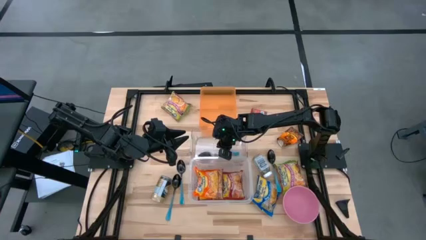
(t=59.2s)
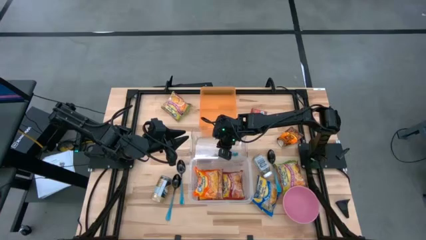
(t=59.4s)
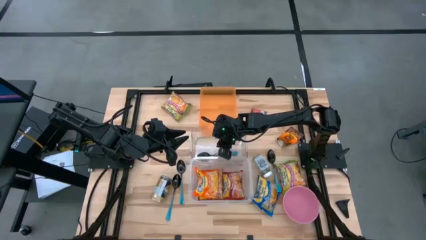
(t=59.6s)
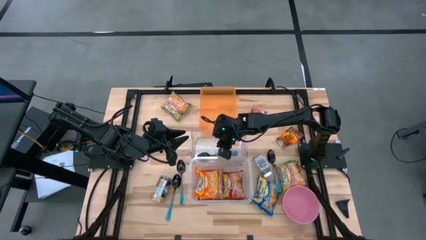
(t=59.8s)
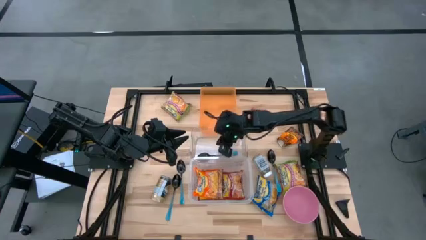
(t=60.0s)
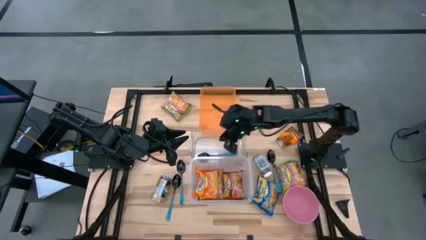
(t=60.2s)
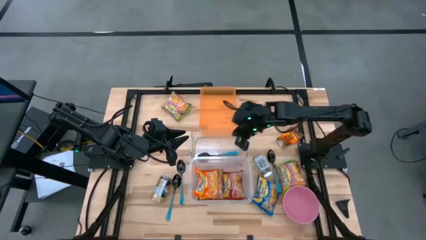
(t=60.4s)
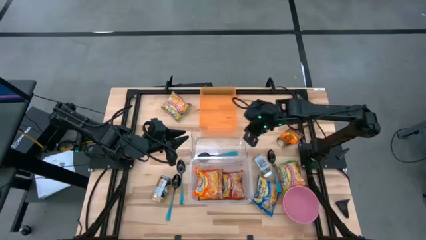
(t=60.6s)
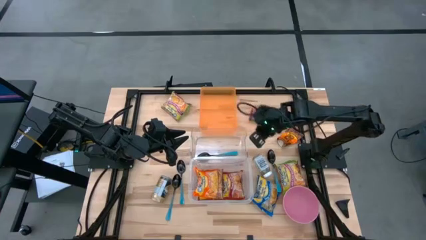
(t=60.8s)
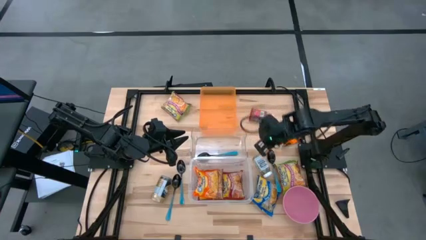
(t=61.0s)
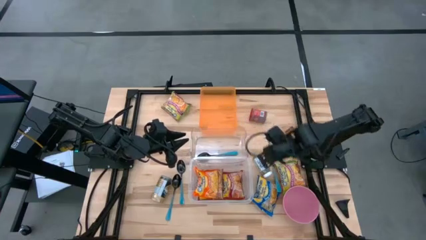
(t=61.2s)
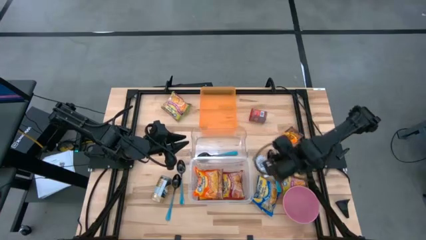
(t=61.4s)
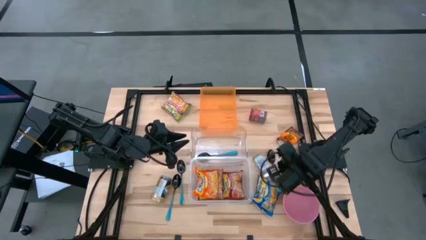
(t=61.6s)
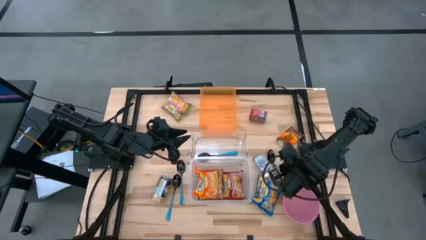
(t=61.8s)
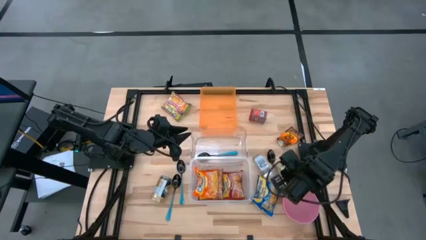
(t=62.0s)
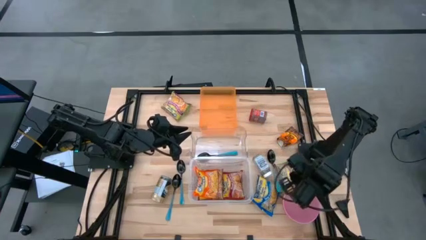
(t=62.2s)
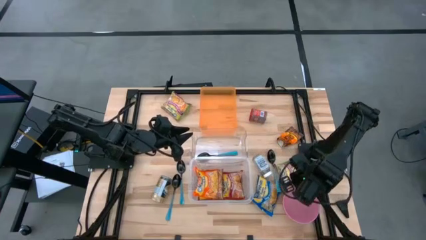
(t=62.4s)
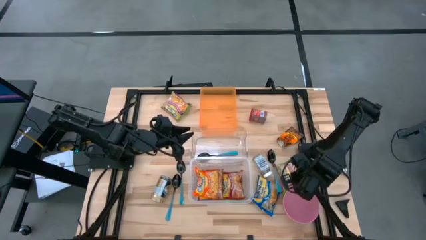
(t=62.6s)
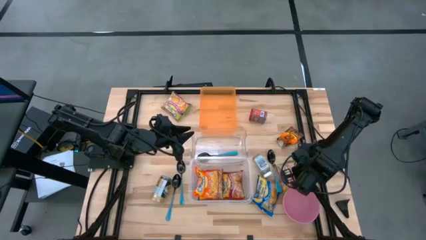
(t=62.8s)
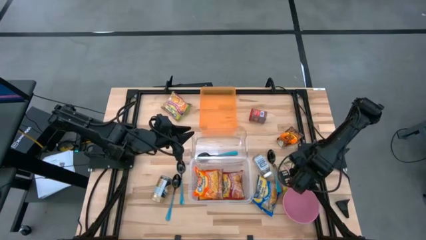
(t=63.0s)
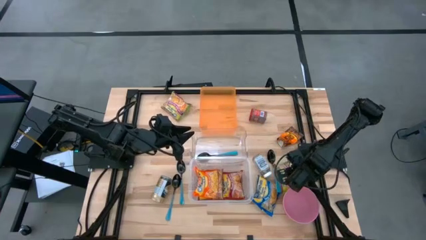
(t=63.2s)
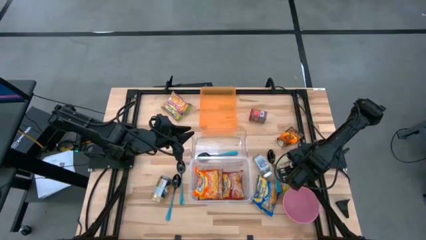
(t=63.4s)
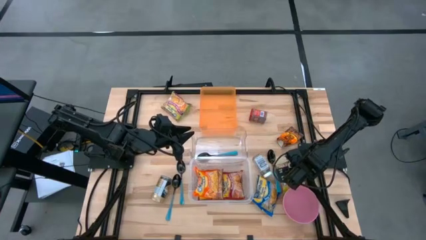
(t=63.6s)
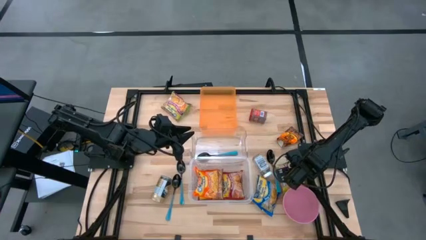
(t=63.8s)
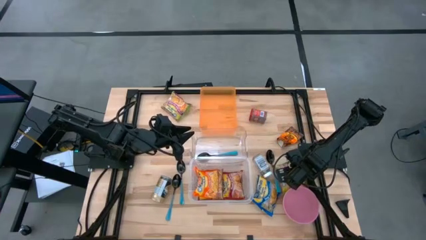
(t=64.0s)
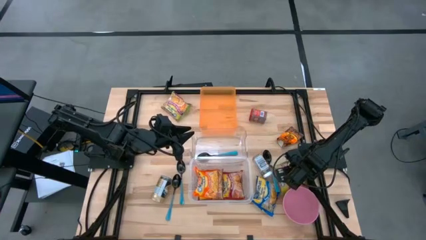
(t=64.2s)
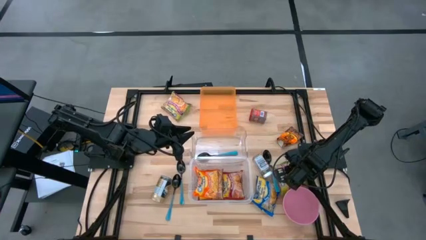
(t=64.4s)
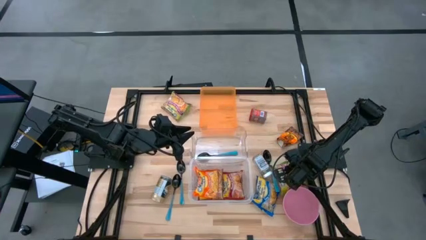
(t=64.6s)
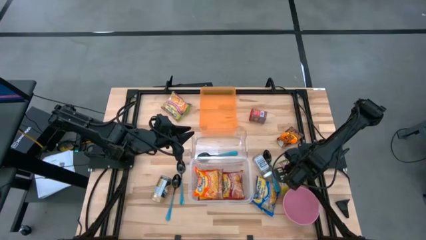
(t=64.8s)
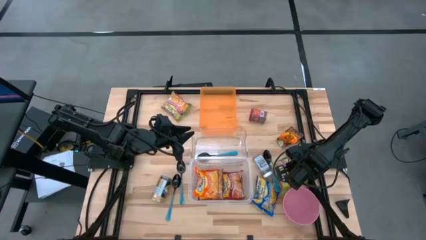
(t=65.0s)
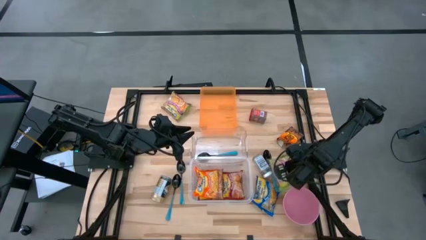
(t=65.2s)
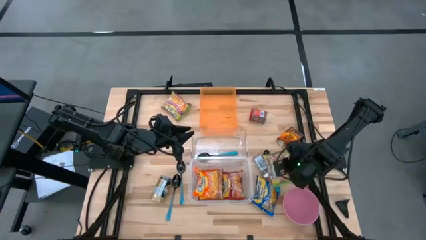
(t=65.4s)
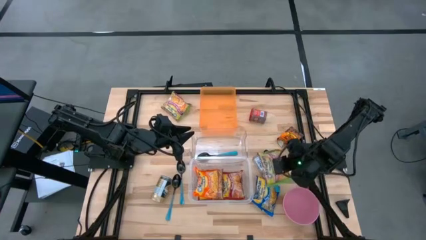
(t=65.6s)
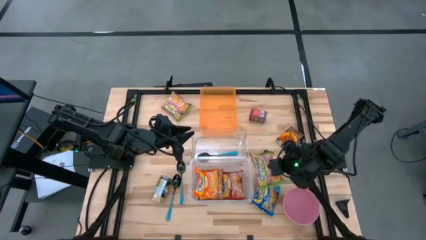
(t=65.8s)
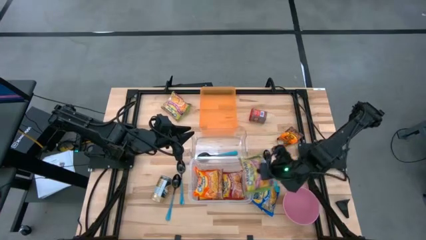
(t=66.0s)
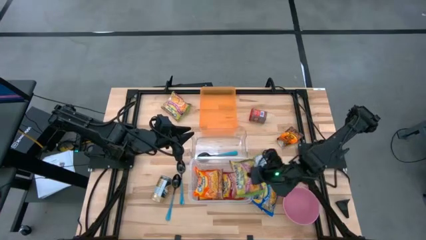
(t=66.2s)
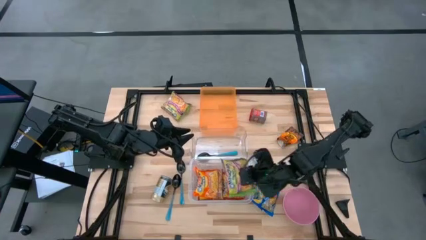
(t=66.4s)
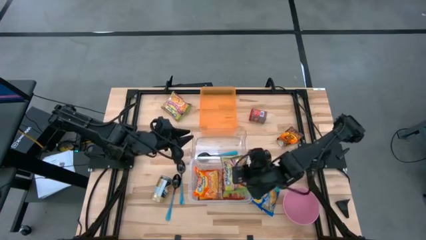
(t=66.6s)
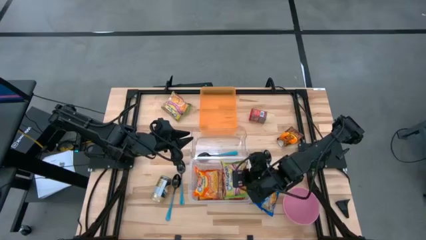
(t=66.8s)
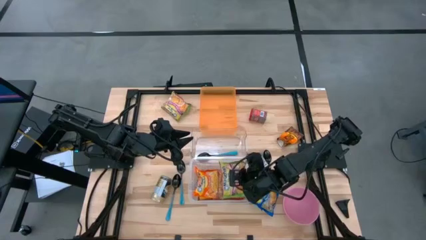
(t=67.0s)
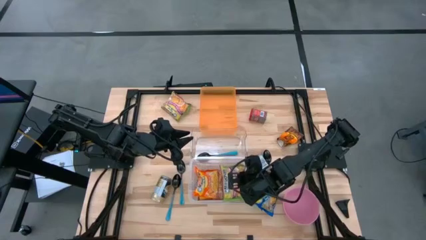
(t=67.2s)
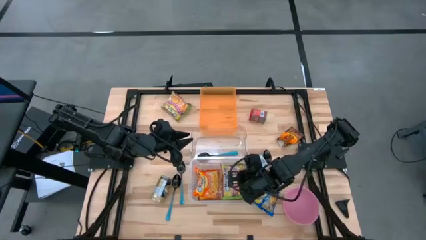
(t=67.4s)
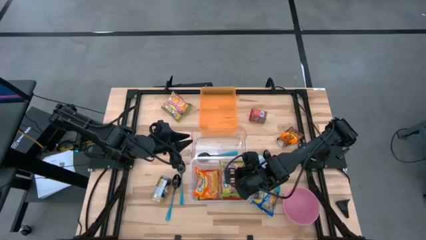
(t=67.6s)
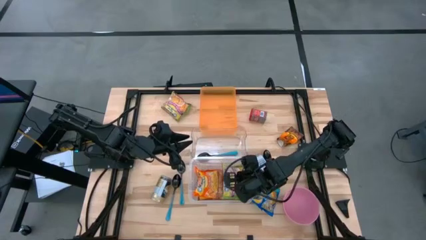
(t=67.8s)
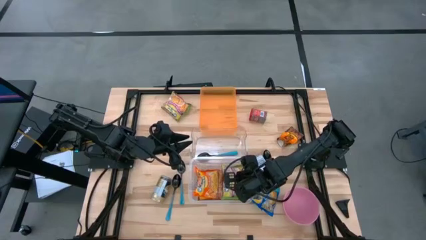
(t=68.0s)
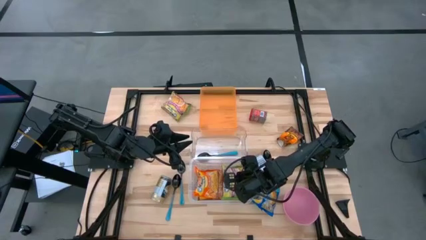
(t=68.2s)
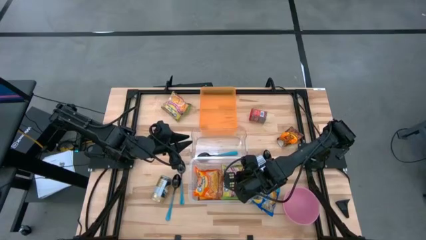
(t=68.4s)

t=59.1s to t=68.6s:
Task: Pick & Place Food Item
Put the green noodle pack into the white transparent bin

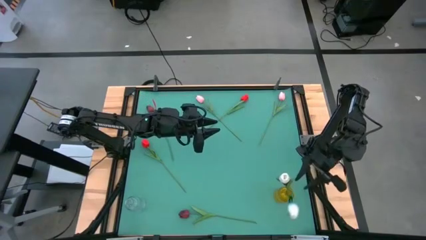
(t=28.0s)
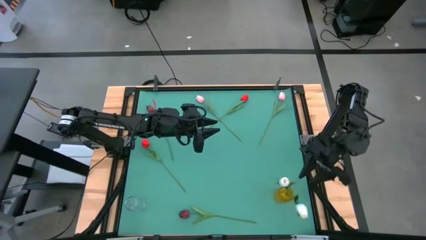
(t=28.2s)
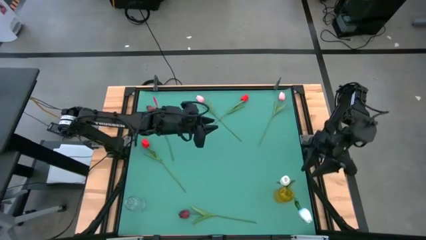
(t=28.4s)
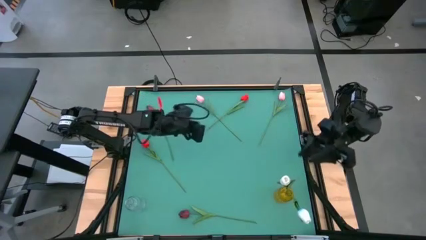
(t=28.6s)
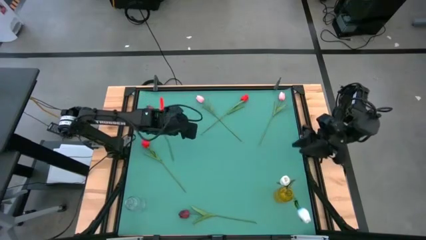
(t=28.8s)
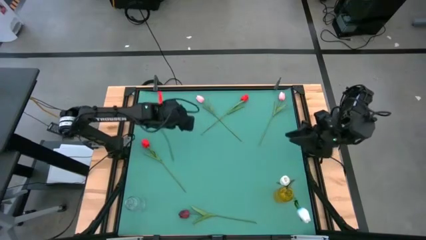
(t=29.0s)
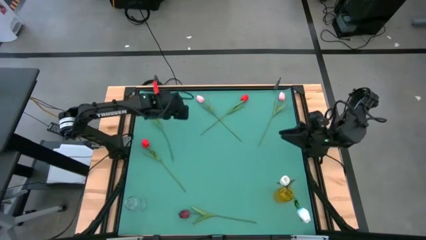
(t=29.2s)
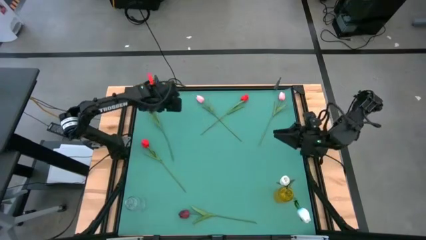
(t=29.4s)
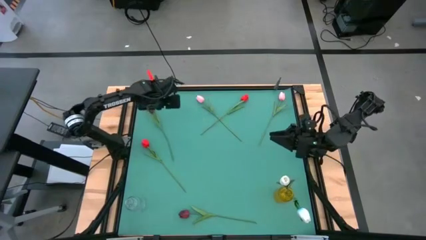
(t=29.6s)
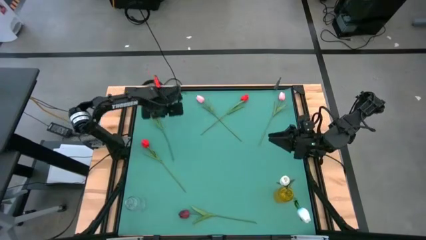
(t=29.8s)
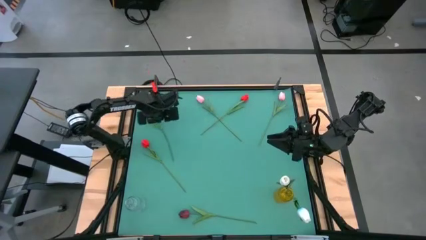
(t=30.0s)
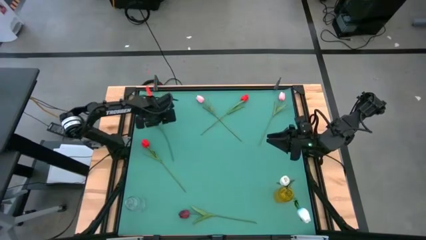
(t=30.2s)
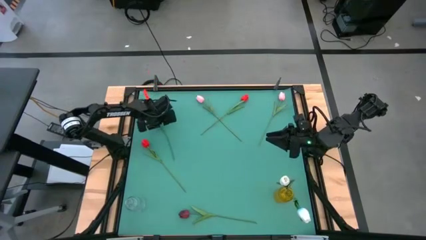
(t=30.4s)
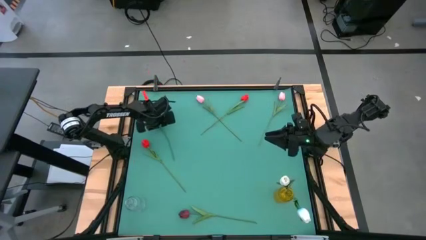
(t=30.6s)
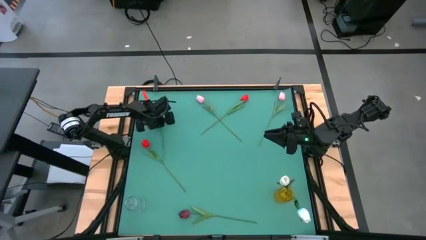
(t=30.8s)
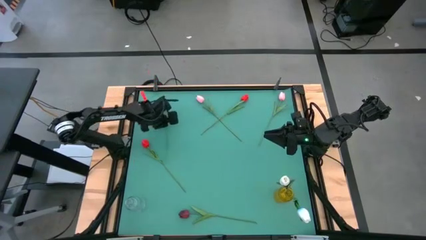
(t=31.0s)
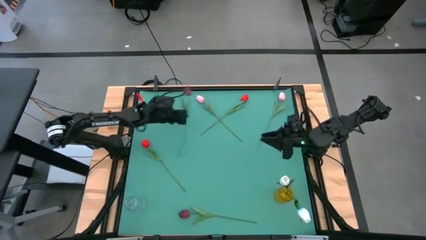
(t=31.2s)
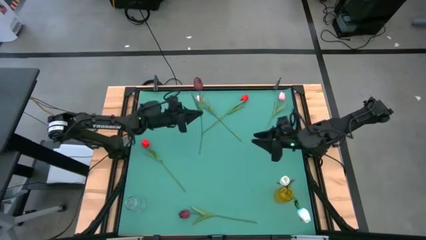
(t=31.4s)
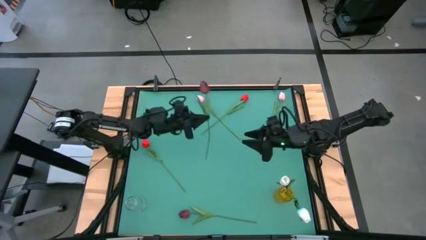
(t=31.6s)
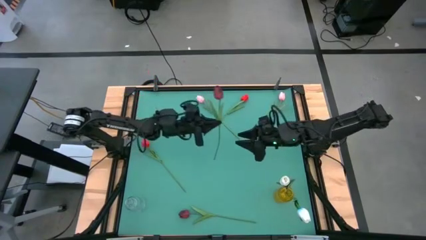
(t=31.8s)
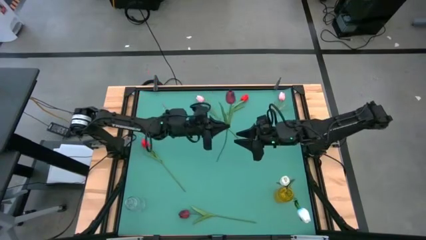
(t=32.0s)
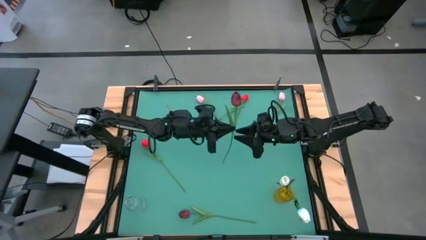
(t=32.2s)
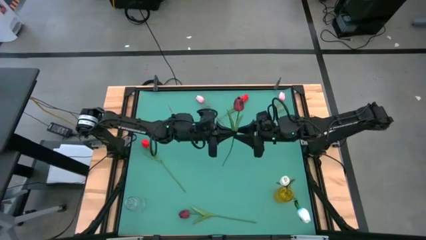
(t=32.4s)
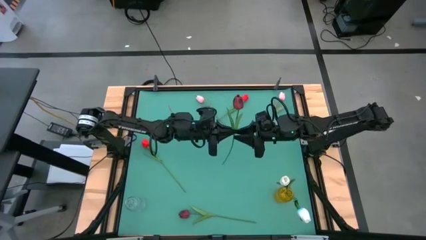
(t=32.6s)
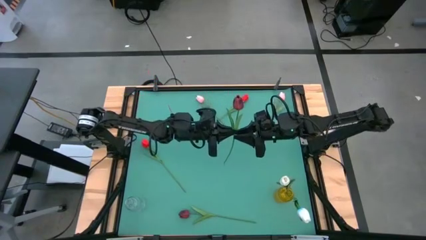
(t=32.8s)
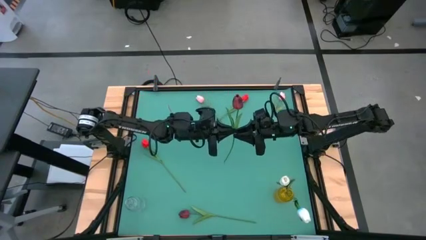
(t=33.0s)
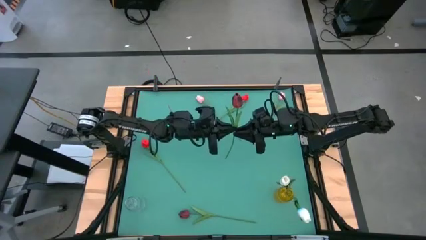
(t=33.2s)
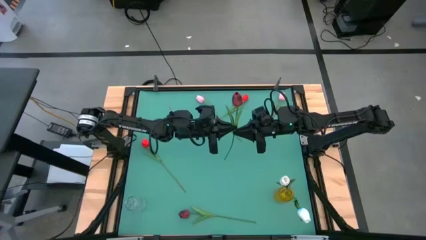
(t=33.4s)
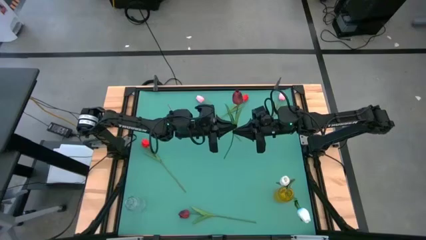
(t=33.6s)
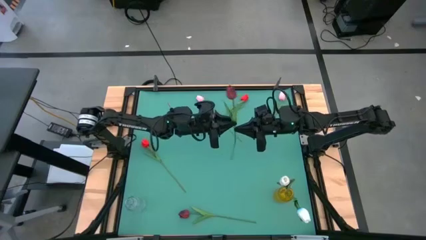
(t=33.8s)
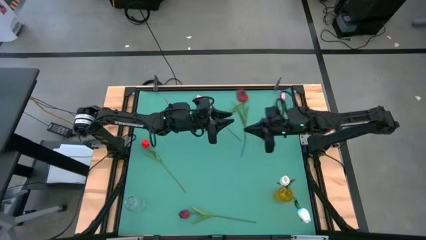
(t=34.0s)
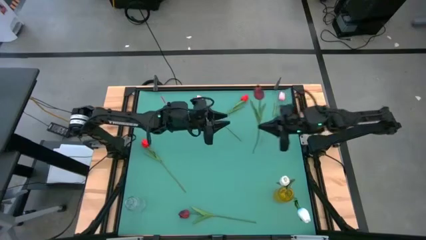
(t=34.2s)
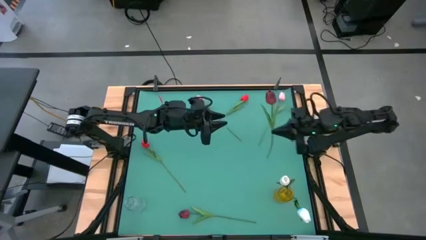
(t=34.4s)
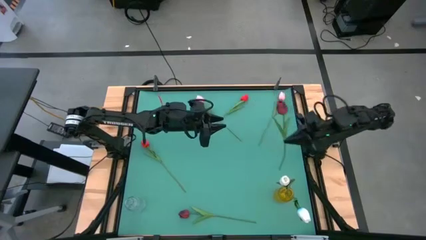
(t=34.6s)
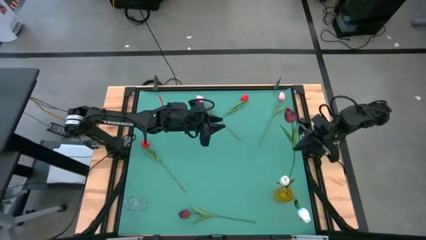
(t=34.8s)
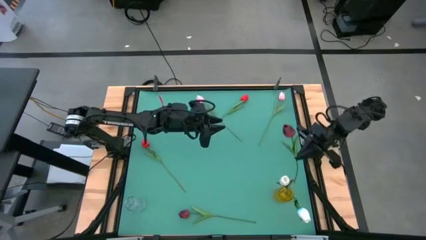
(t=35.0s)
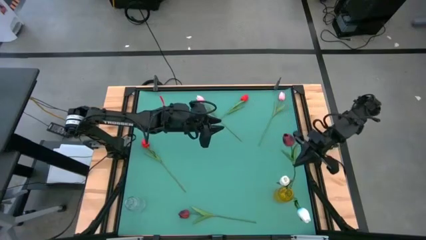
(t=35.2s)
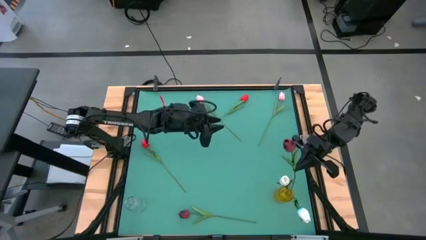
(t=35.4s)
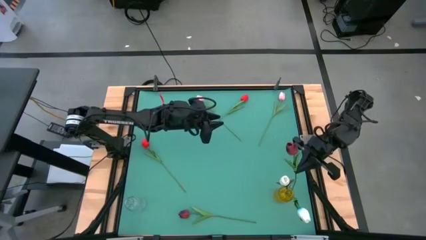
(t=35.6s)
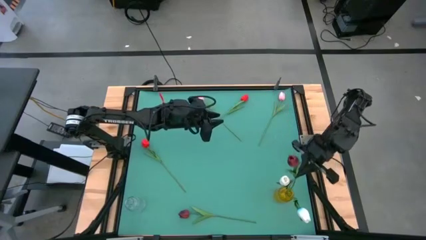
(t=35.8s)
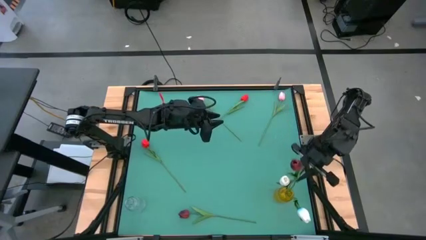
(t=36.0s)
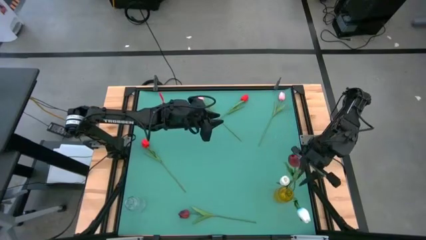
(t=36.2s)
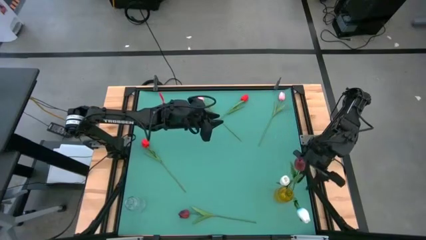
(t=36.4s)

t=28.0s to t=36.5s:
Task: Sort flowers into vase by color
Put the top dark red tulip into the yellow flower vase
